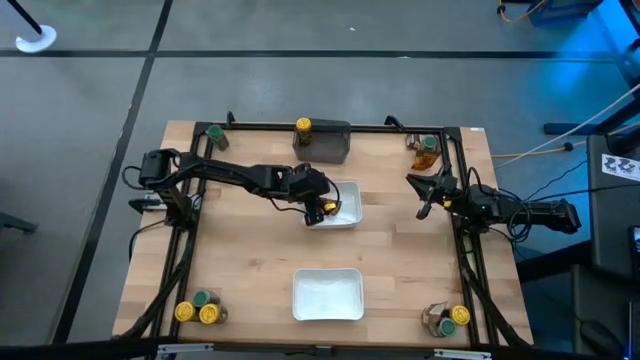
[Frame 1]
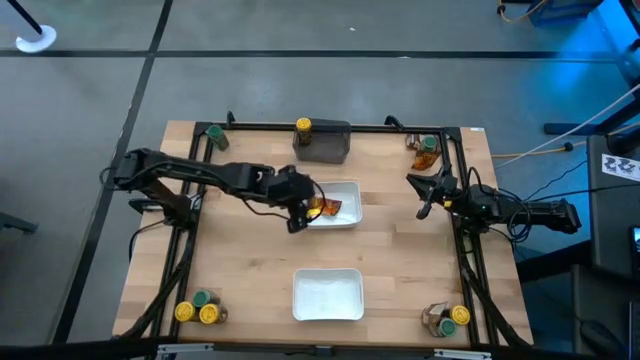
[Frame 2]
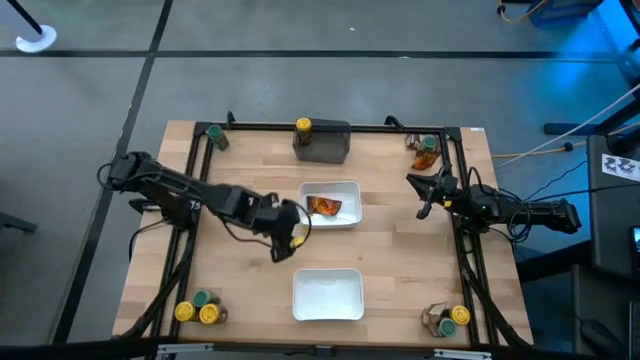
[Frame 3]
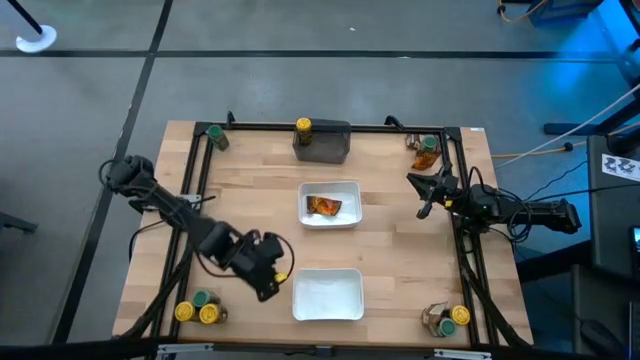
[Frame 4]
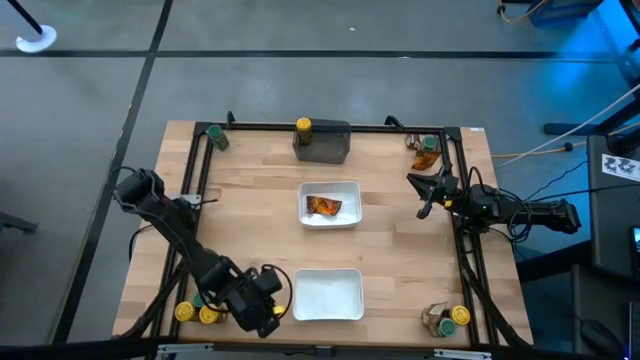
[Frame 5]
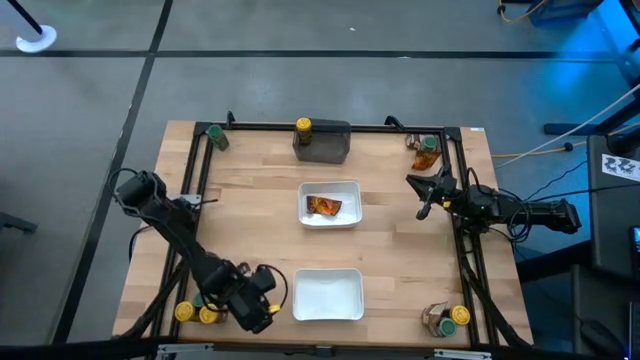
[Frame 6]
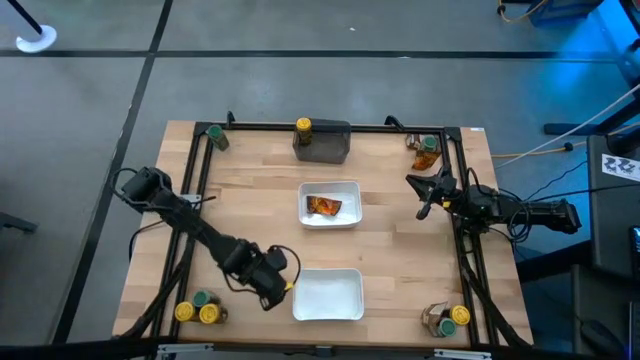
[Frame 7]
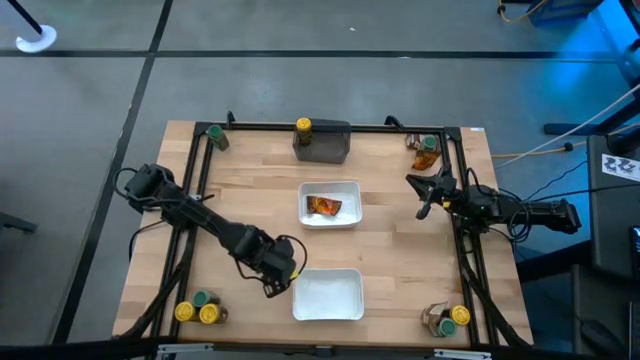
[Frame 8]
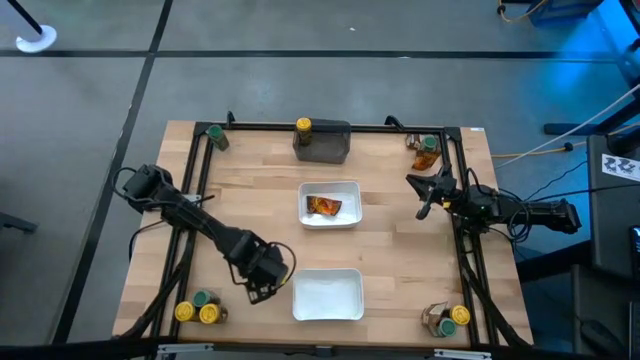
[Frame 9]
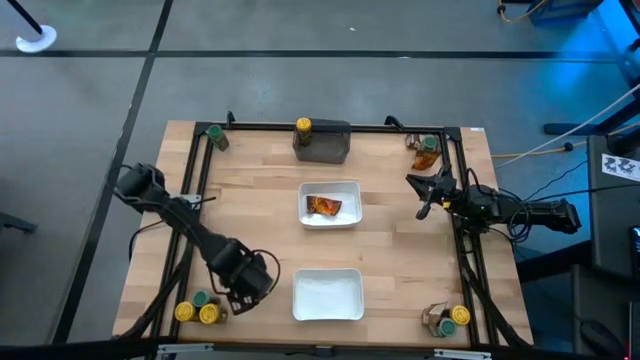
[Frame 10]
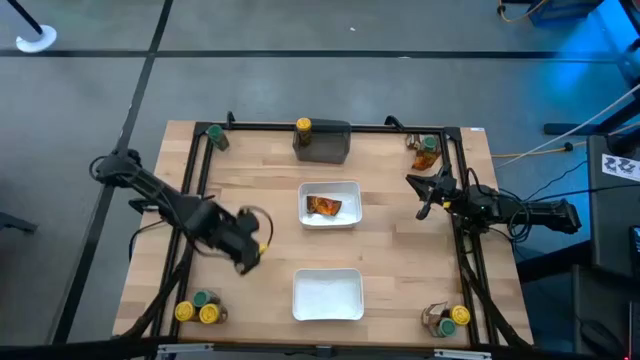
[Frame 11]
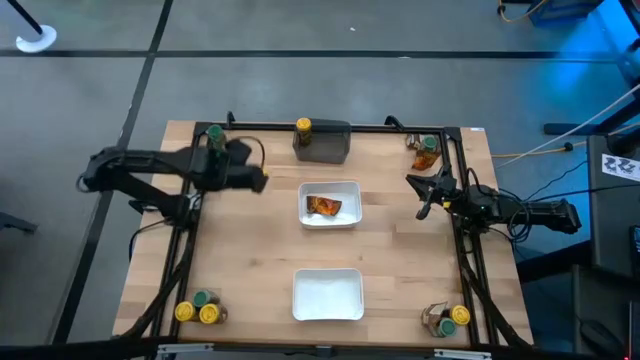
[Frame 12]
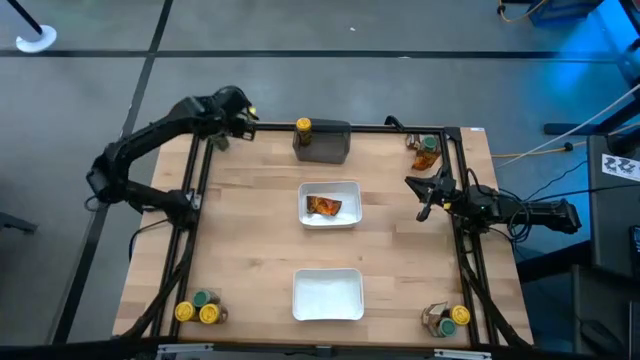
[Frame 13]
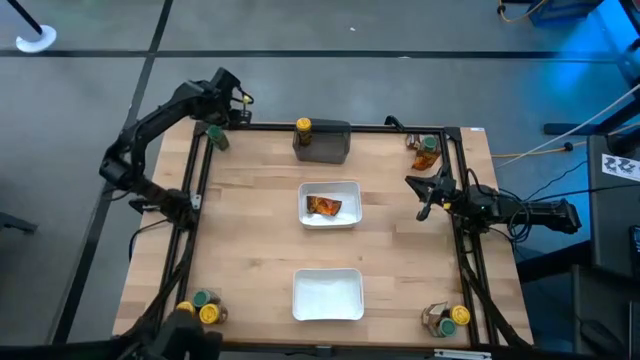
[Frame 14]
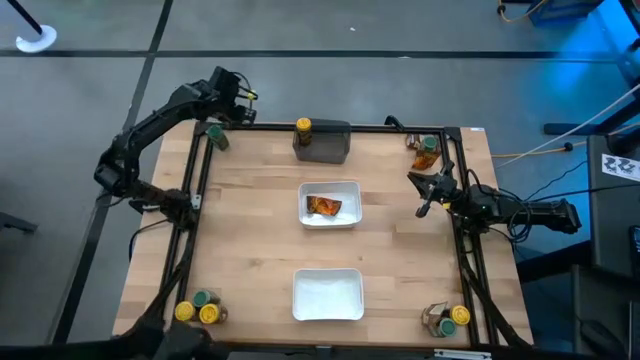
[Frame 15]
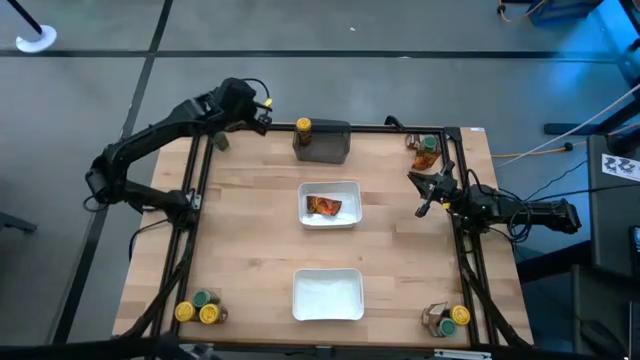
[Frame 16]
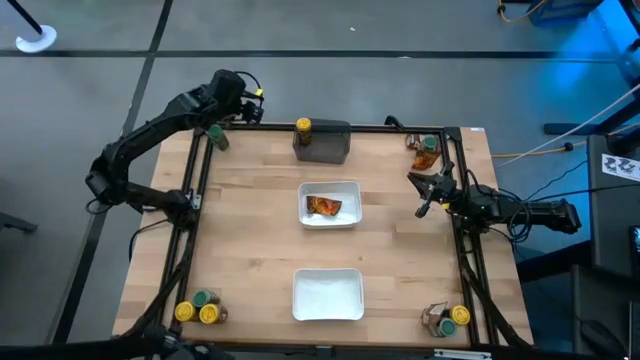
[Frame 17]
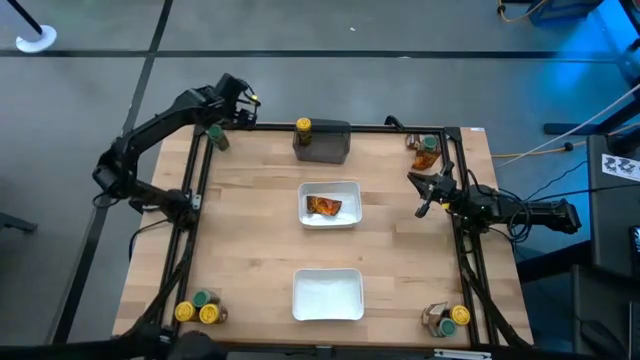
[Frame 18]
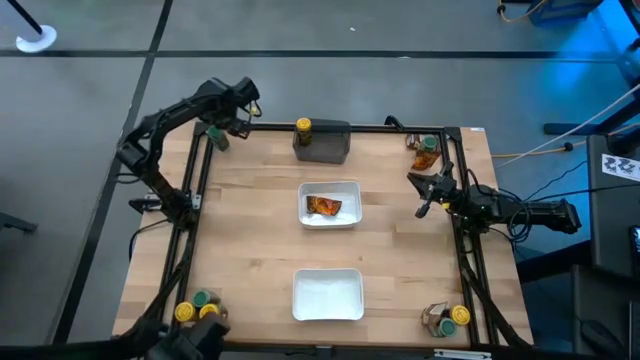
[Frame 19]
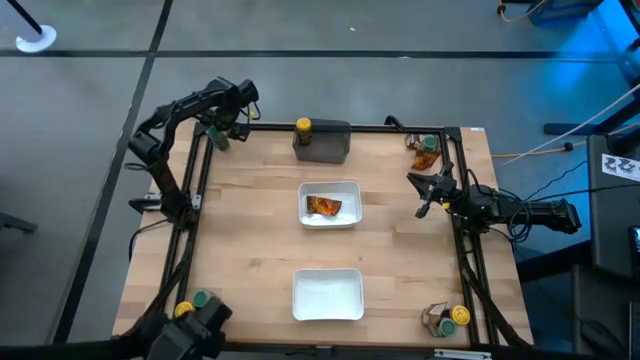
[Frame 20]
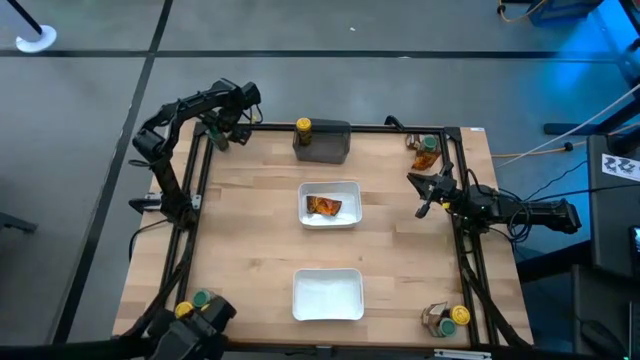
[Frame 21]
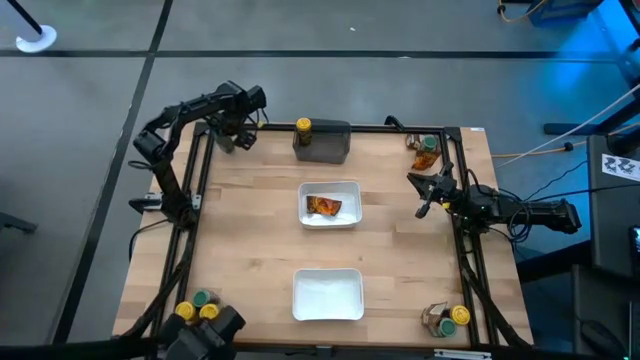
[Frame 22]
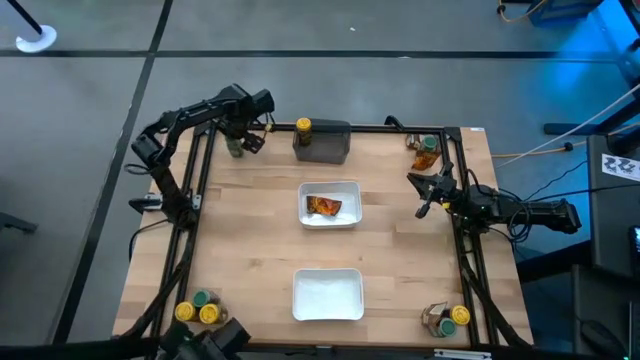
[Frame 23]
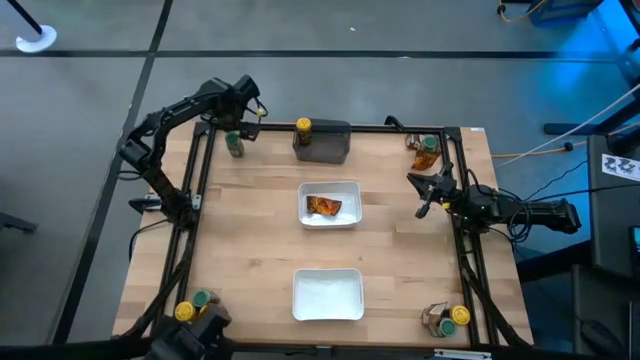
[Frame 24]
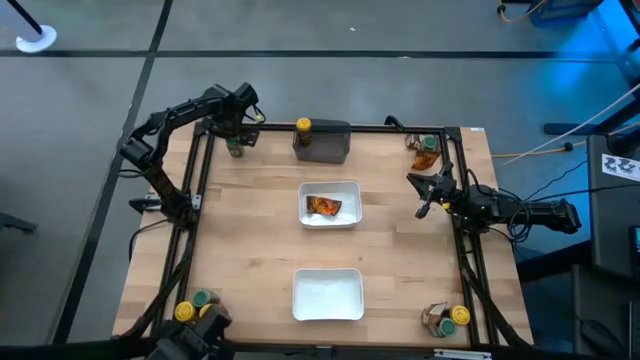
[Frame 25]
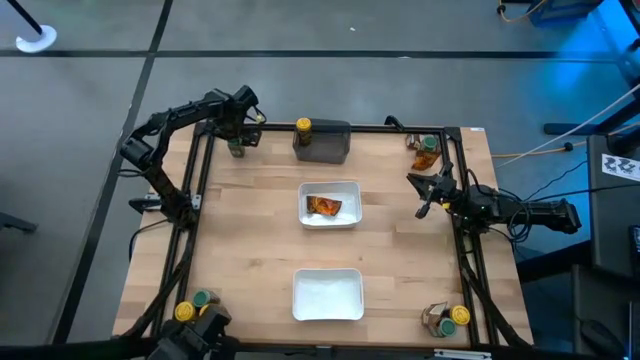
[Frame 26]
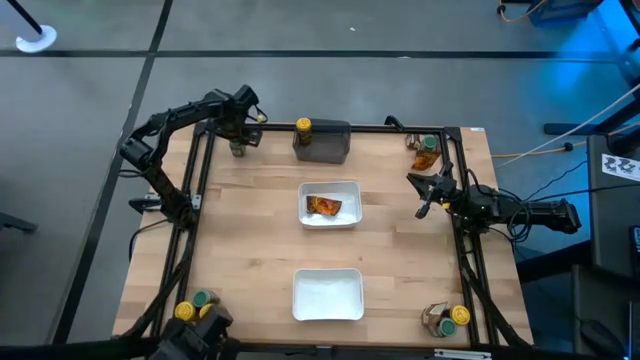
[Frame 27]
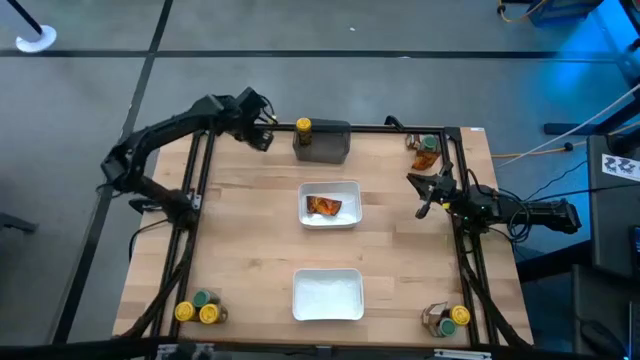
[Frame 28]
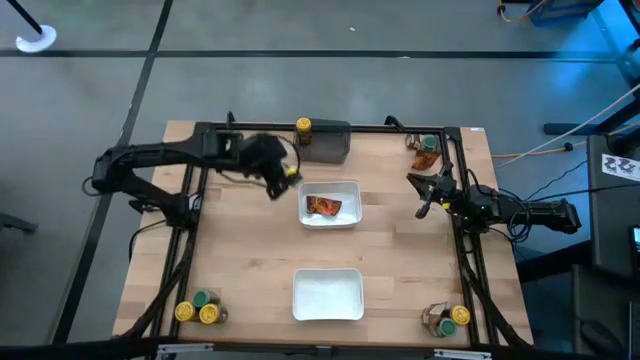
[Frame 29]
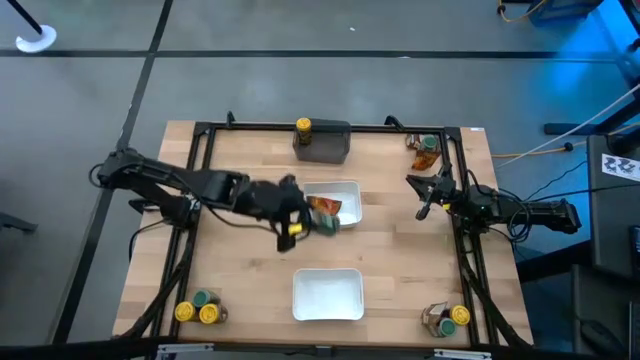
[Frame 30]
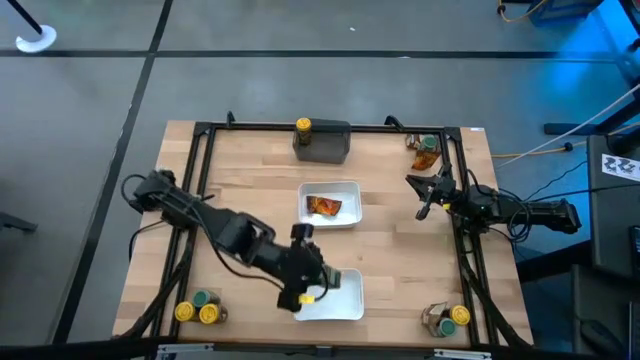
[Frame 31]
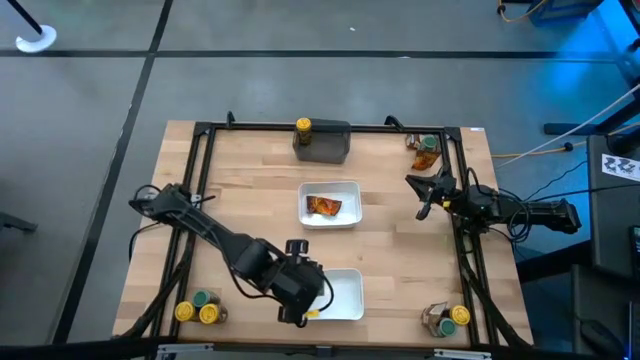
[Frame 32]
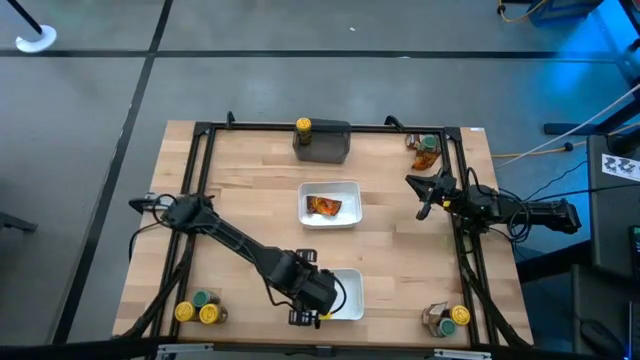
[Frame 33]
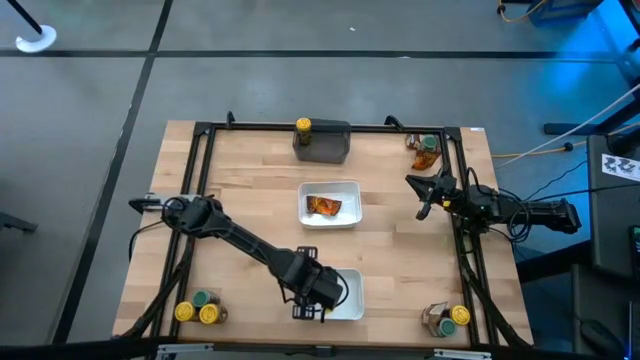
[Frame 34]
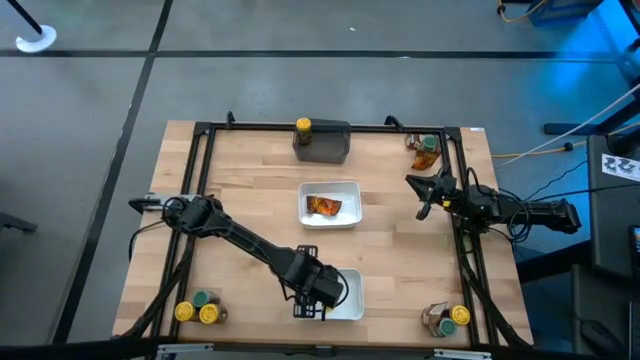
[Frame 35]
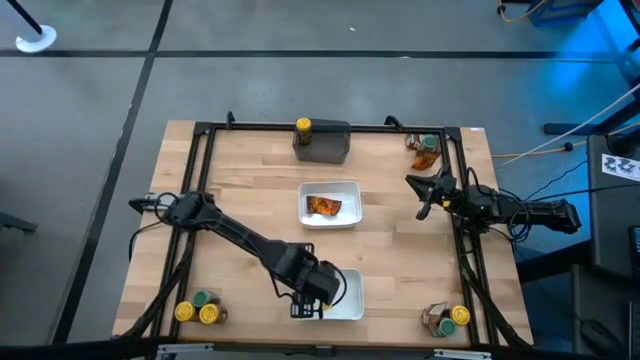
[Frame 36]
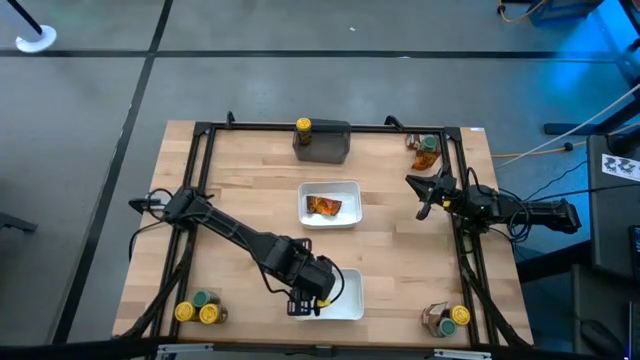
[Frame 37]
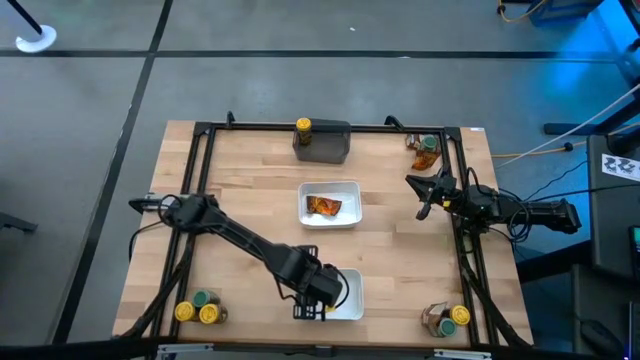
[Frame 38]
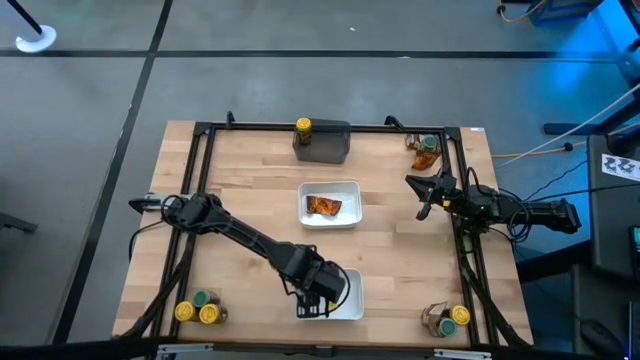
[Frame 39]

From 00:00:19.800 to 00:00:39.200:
Task: Sort spices by type
Put the green seasoning bottle into the bottom white bin
